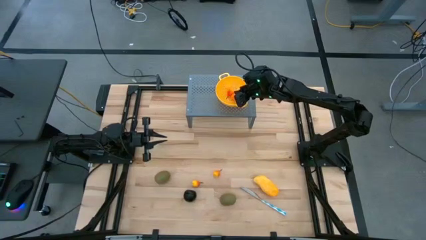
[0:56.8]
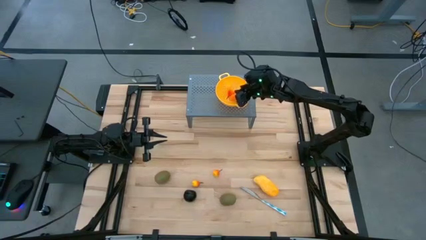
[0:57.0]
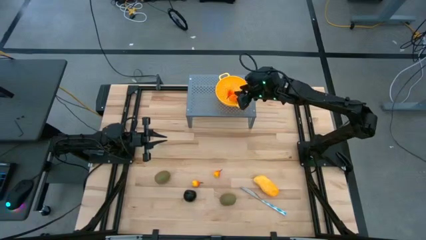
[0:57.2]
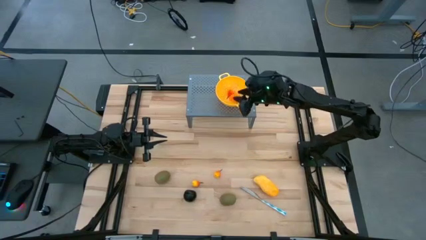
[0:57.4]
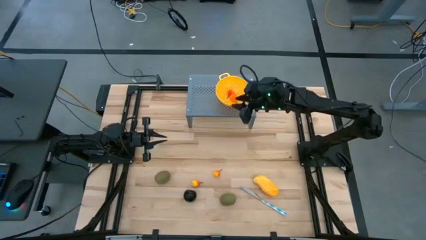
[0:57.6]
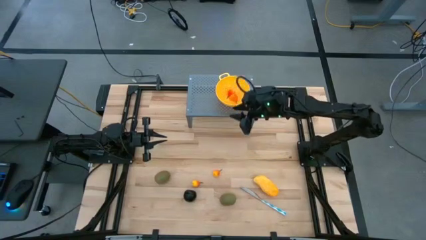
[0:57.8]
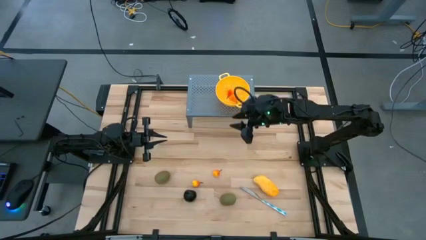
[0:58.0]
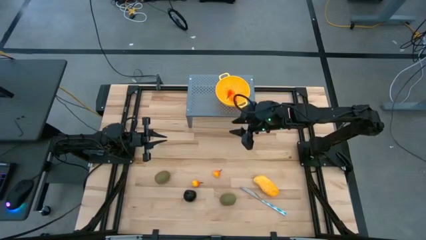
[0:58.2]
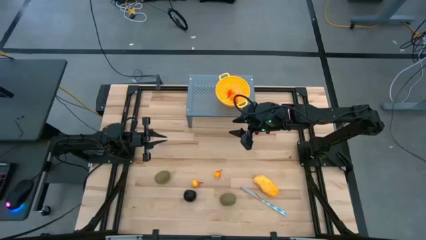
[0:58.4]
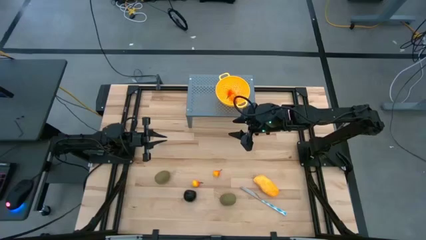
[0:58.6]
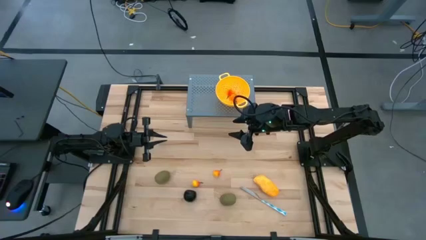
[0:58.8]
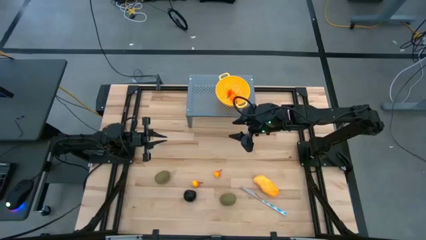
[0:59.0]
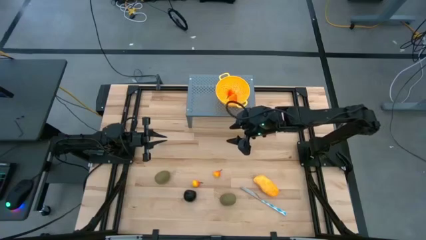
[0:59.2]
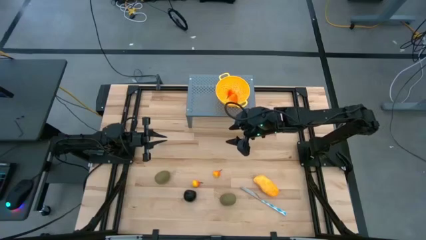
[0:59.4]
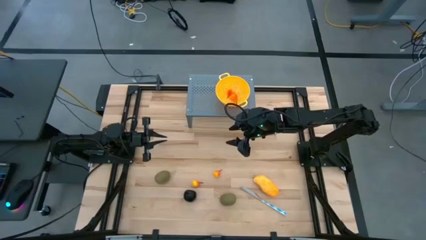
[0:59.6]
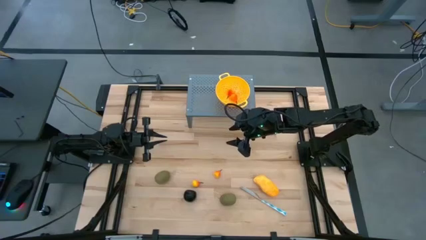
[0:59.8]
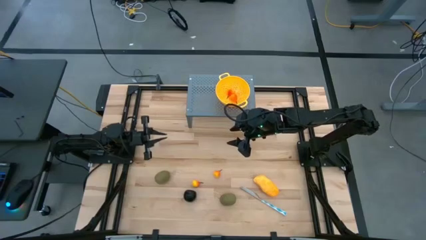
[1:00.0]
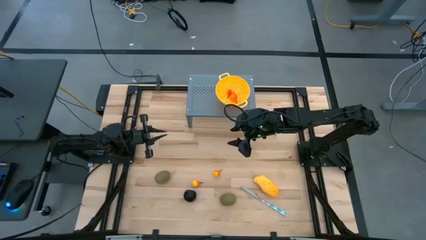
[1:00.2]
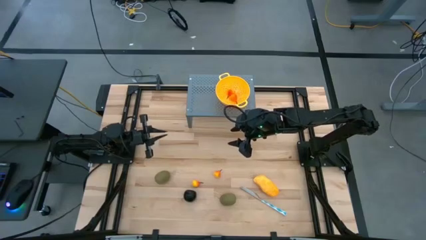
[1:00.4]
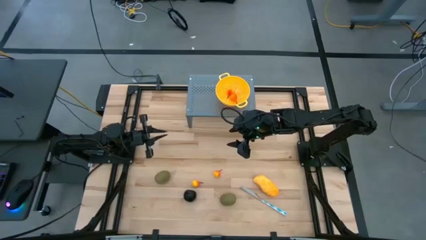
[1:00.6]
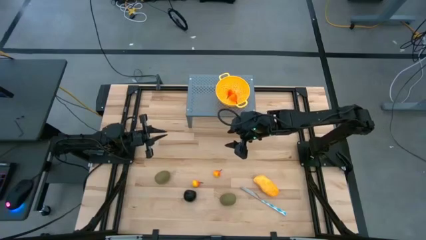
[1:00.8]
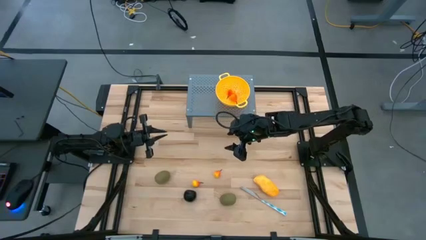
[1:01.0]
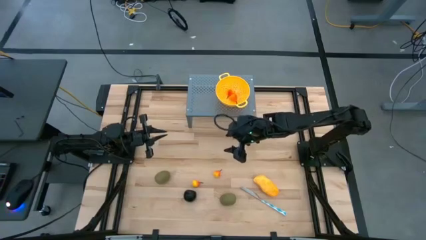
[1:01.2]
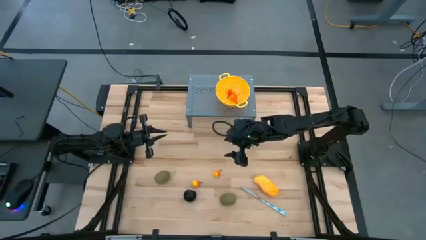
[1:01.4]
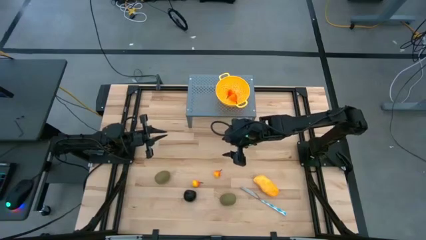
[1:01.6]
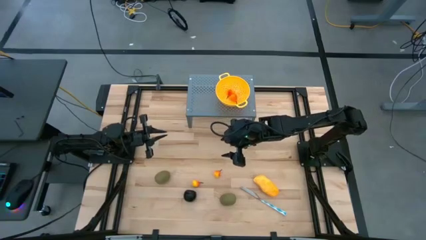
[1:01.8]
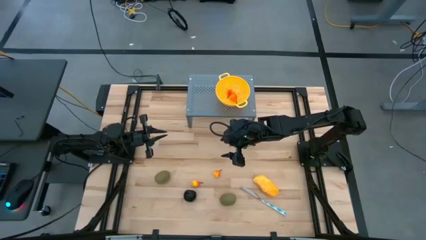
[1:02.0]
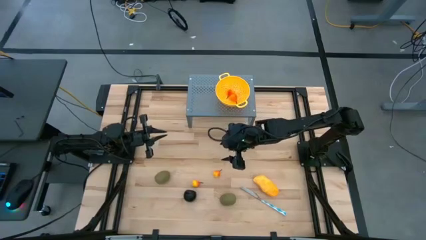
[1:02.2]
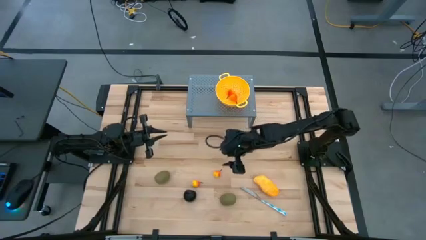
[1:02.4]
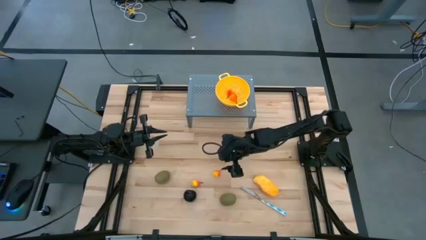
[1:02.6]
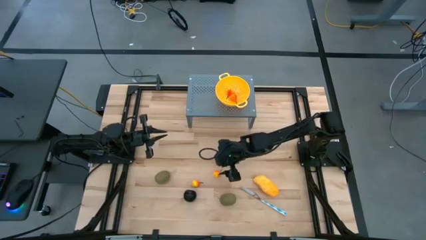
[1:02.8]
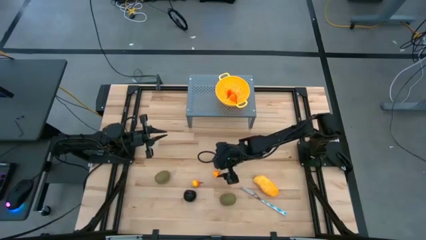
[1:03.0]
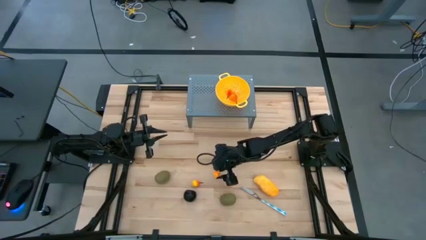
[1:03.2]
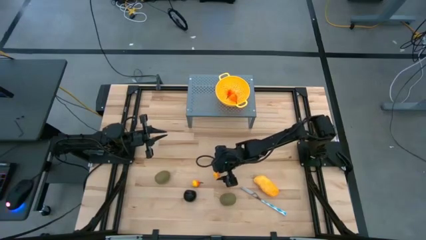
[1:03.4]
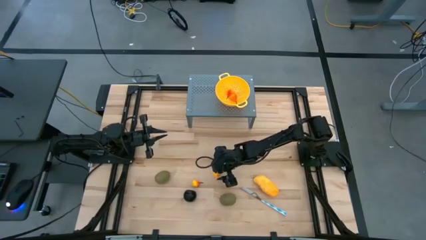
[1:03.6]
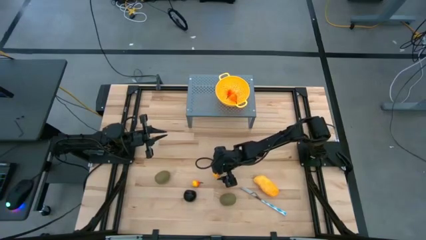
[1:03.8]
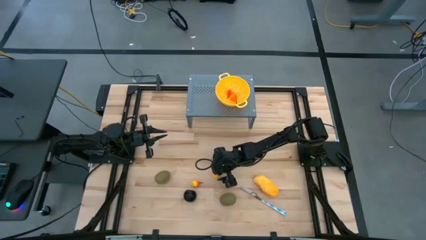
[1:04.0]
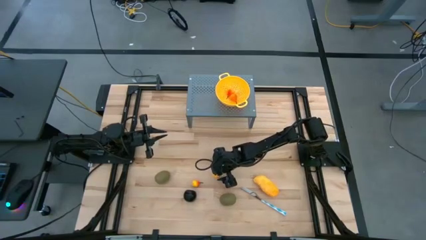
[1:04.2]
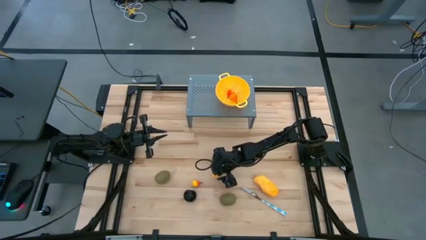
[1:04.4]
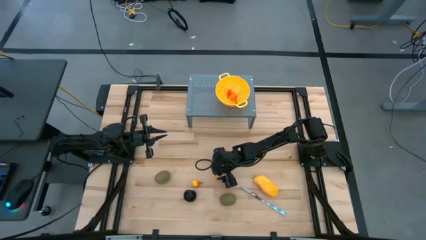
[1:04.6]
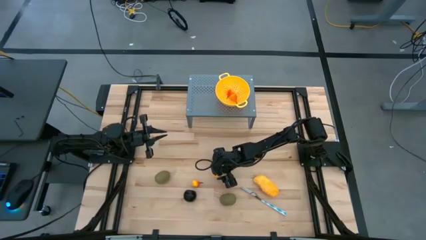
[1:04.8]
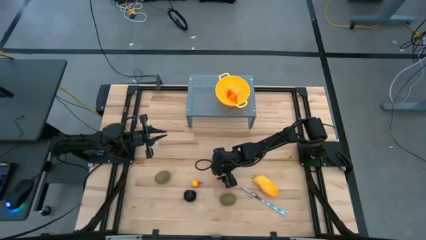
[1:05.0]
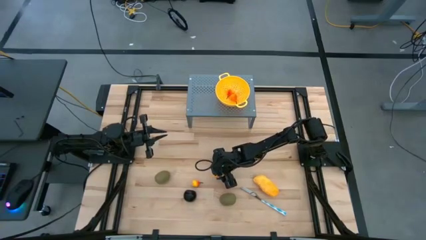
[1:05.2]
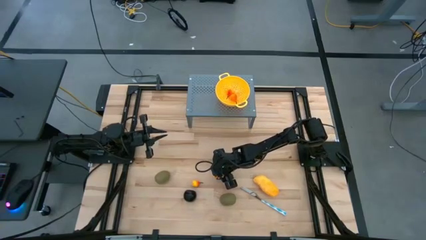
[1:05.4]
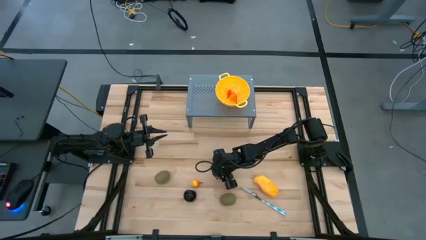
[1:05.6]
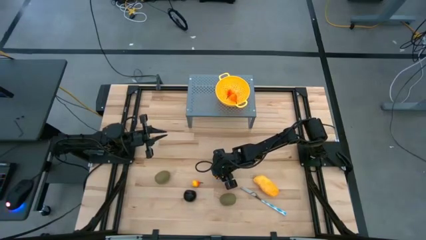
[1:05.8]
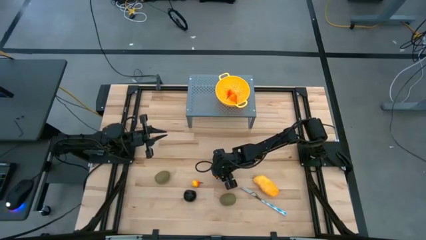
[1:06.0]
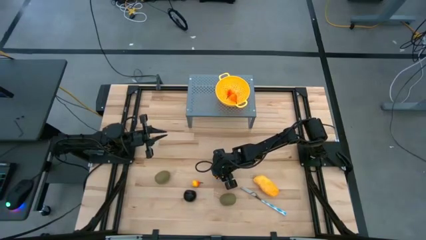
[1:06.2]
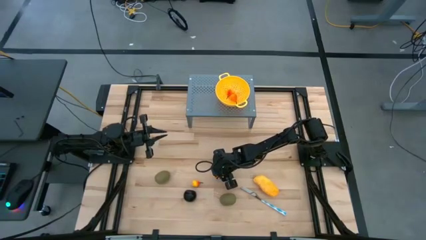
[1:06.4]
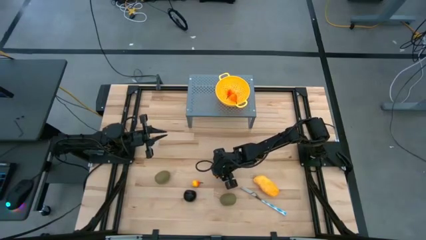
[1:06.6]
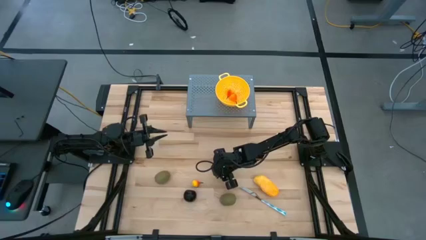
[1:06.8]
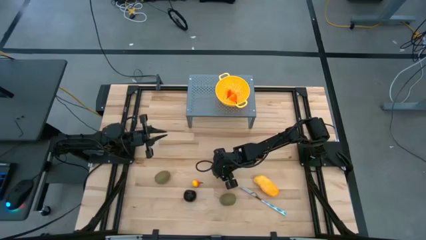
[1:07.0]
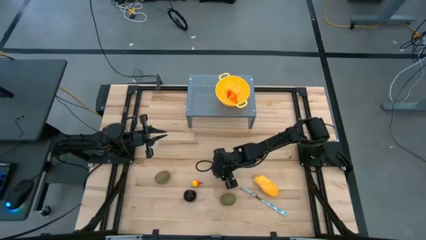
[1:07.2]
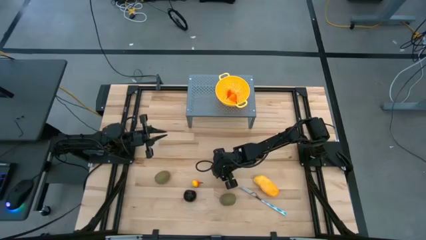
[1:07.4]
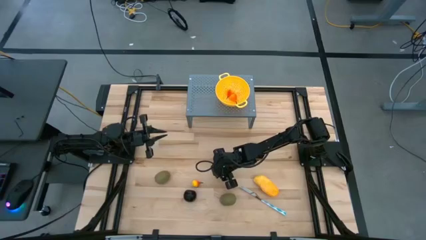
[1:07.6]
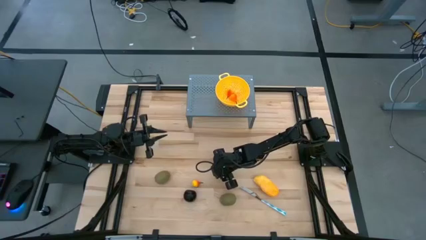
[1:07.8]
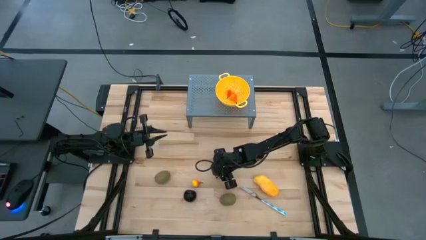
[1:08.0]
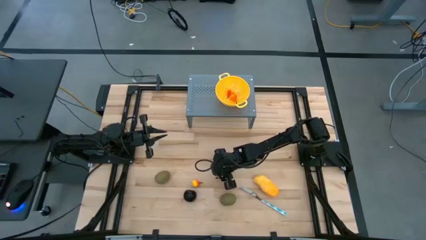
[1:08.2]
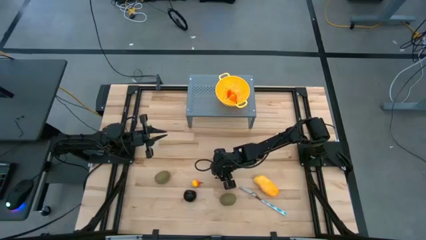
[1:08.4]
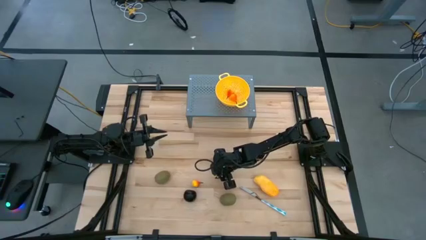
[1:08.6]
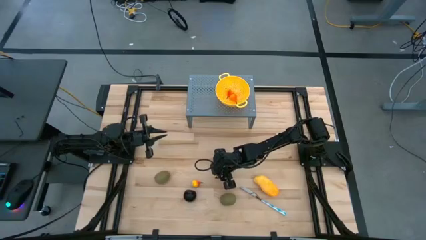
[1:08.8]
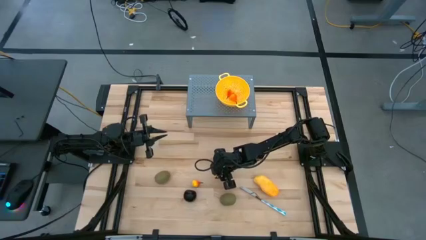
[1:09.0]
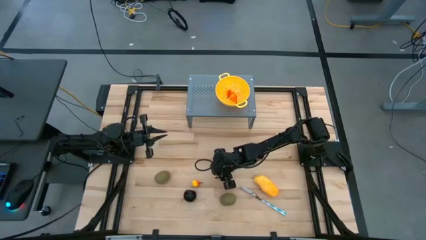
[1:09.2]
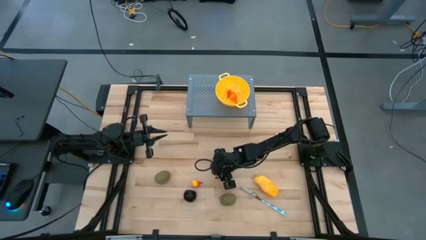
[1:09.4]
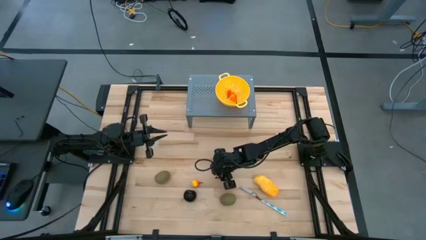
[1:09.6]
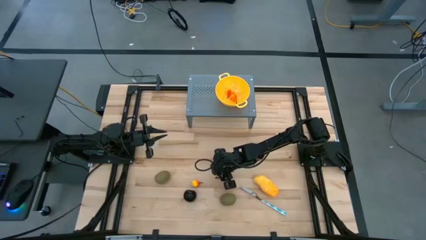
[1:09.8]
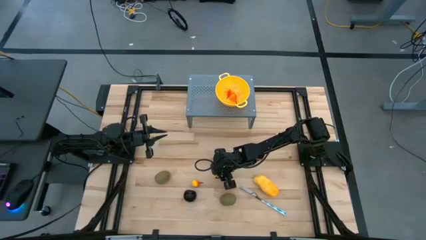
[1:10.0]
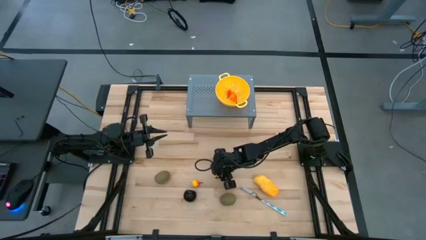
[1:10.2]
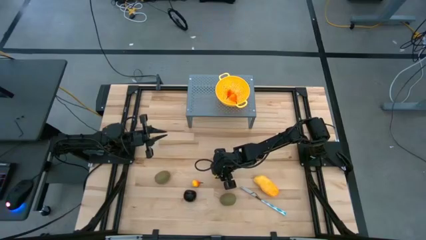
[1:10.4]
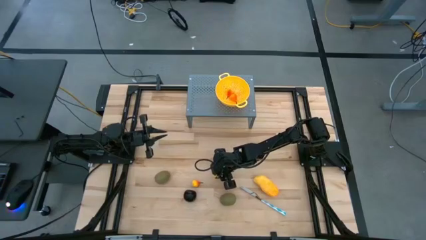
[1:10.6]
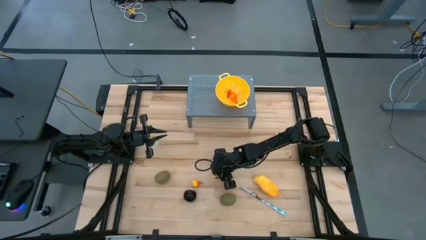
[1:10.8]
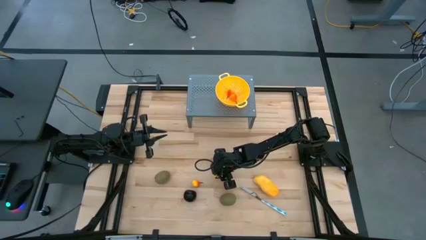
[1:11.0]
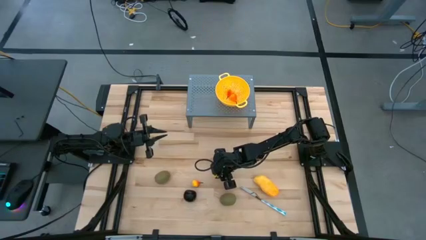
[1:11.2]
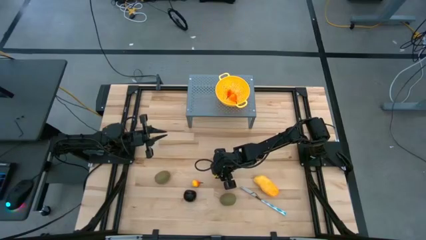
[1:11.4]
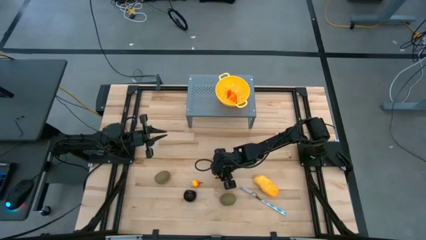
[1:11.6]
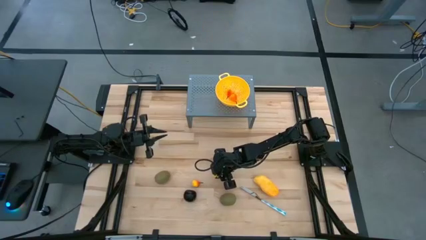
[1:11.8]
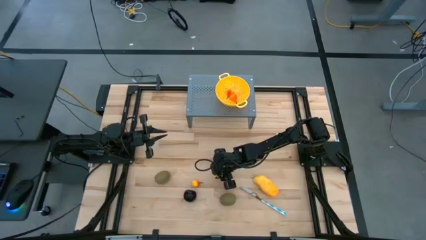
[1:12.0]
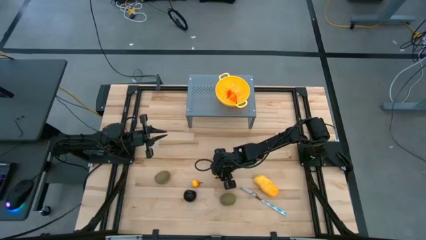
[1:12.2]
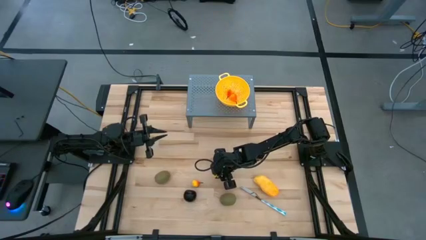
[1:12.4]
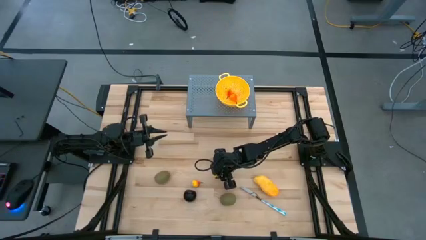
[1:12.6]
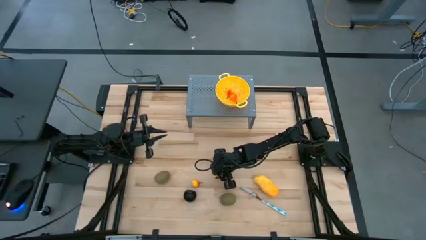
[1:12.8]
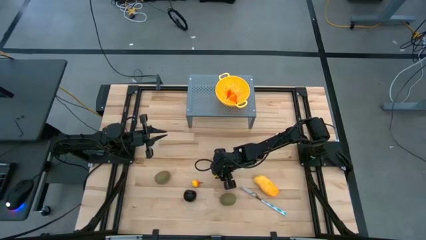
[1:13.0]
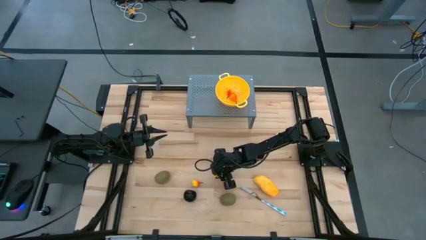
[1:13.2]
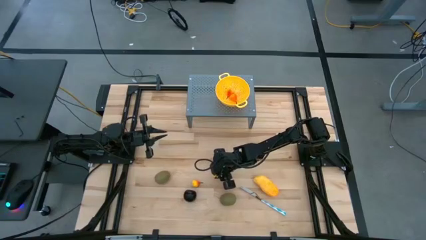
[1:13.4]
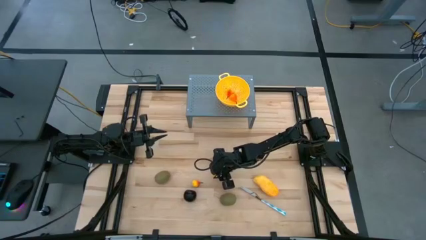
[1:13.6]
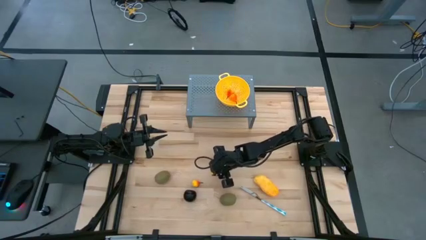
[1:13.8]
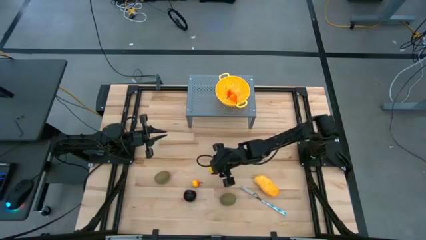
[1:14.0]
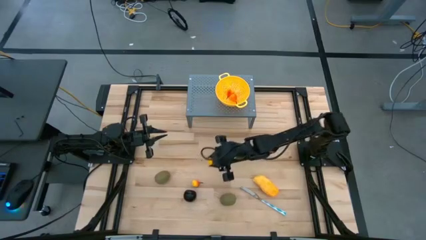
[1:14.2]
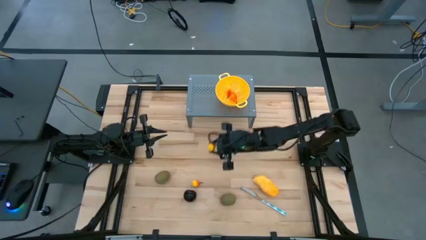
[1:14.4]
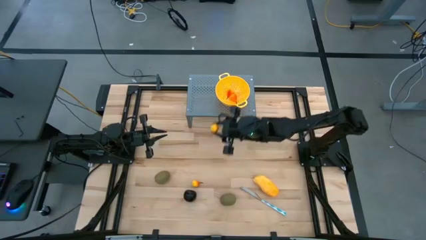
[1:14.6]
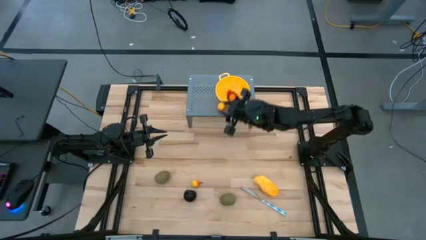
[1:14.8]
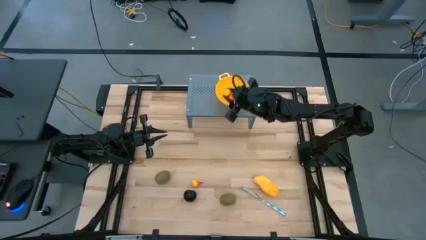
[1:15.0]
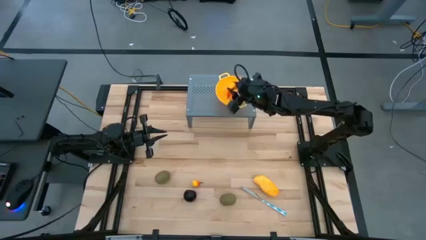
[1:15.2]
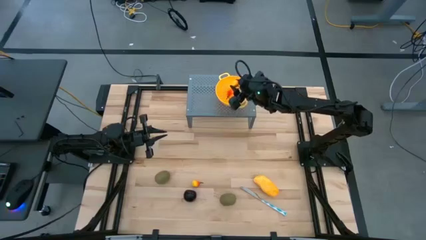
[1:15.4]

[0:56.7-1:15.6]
Task: Pick & Place Fruit
Put the peach into the yellow strainer bowl on the shelf
